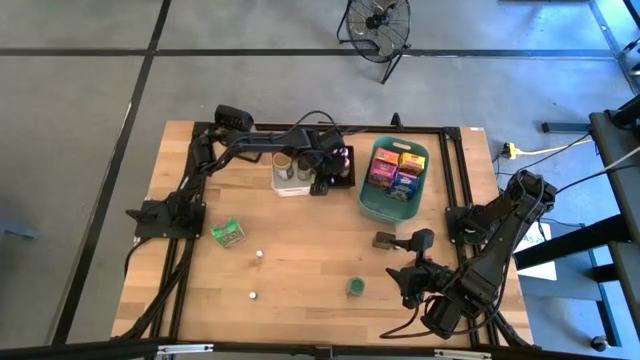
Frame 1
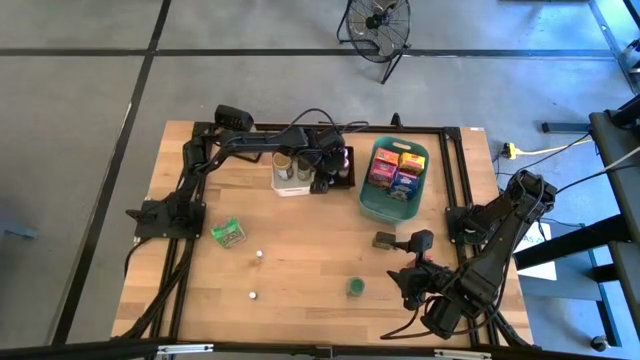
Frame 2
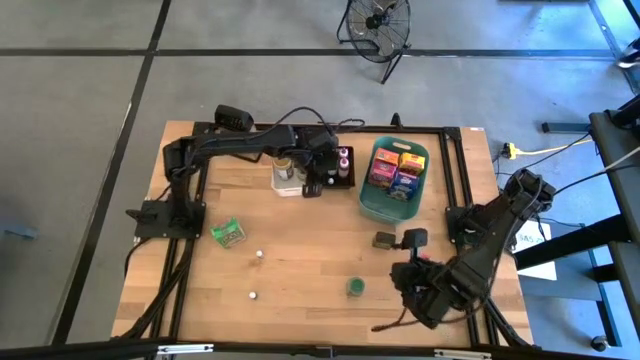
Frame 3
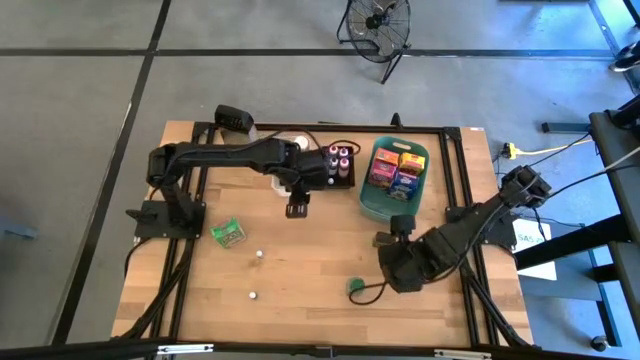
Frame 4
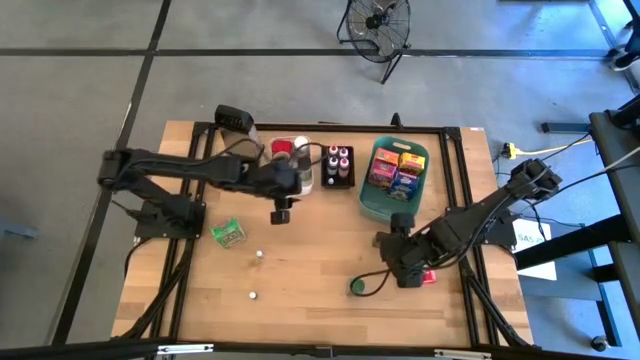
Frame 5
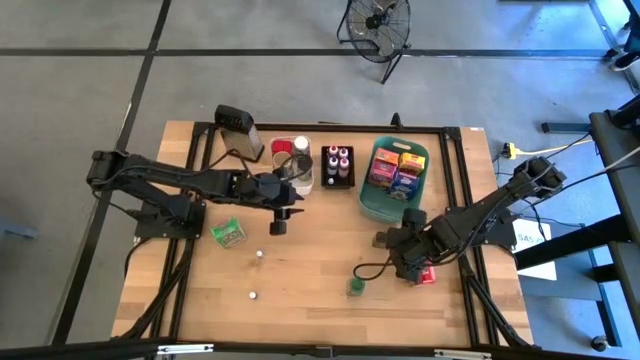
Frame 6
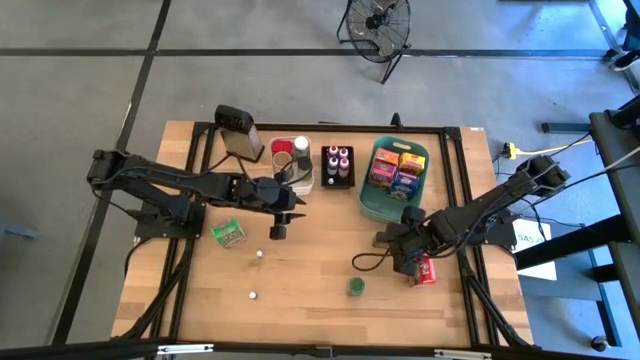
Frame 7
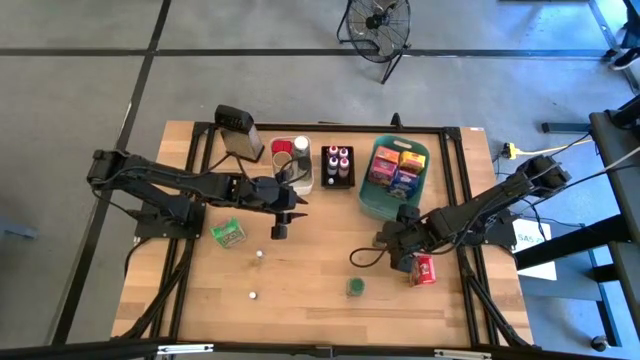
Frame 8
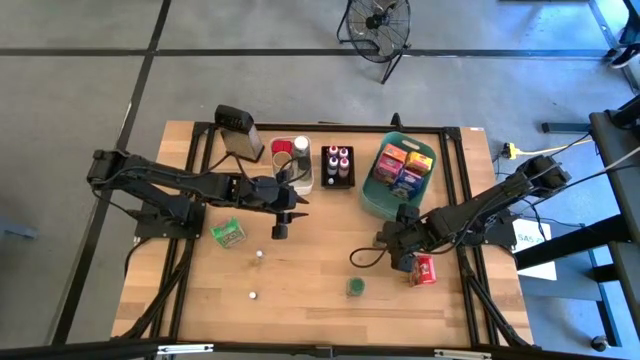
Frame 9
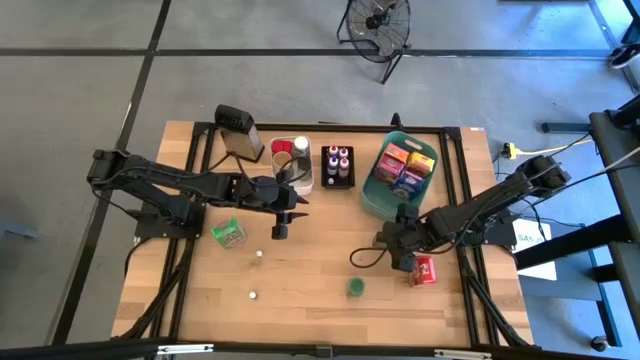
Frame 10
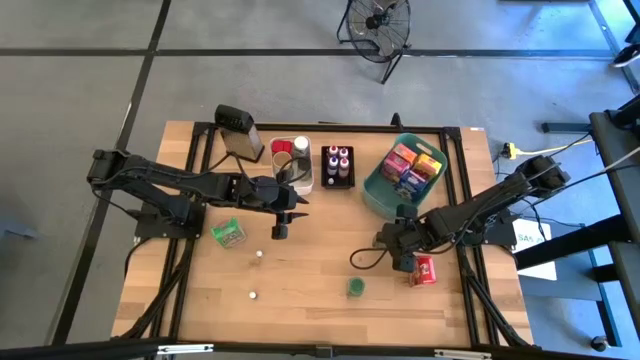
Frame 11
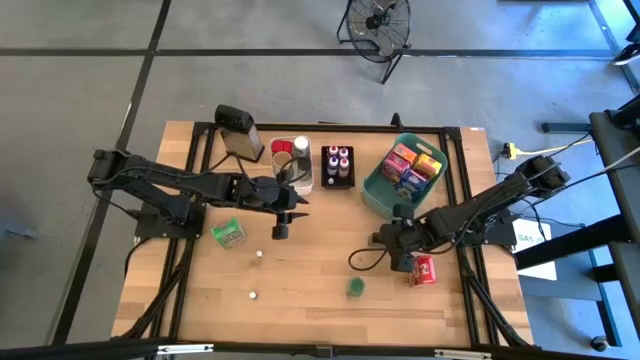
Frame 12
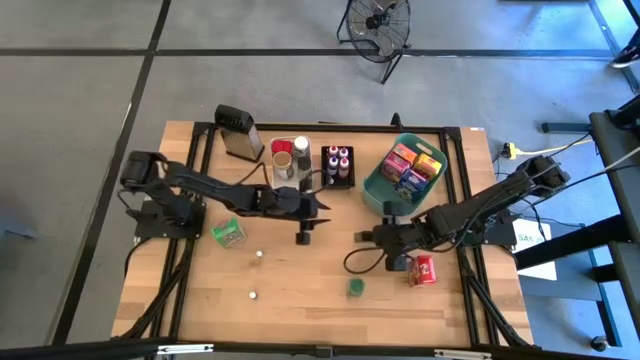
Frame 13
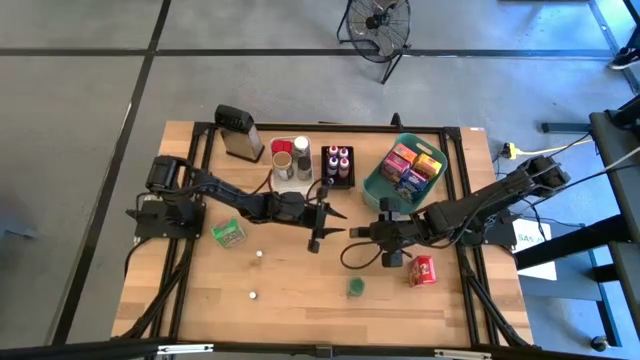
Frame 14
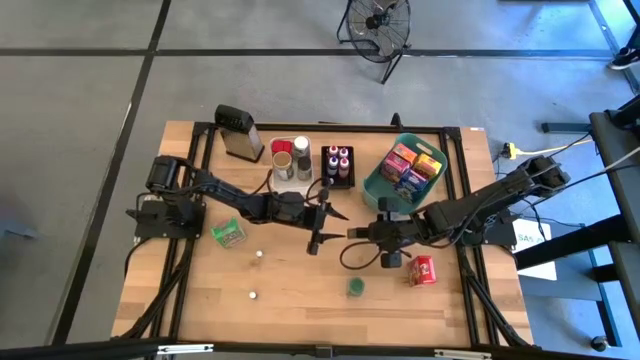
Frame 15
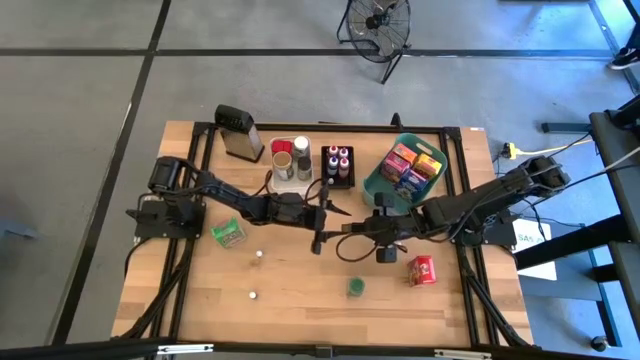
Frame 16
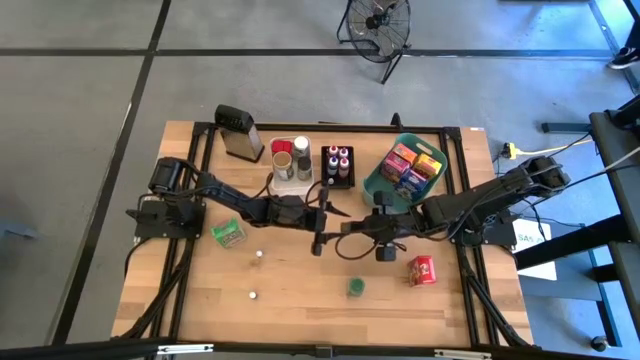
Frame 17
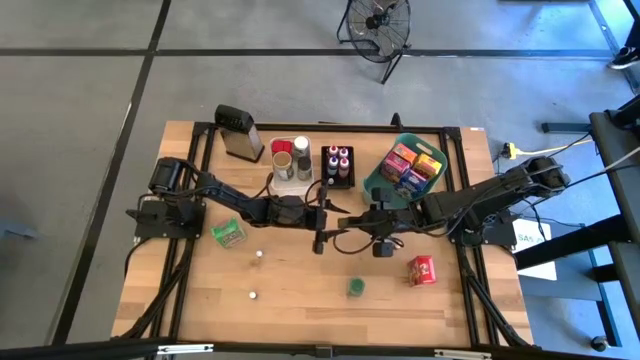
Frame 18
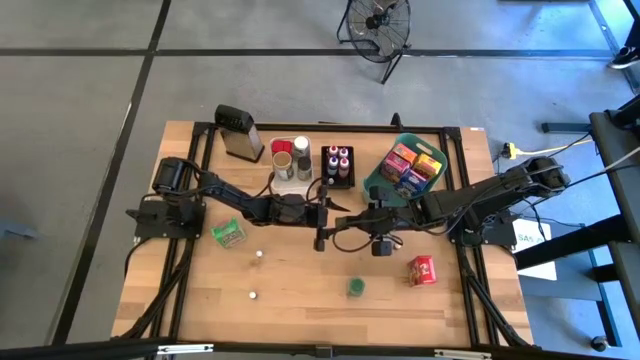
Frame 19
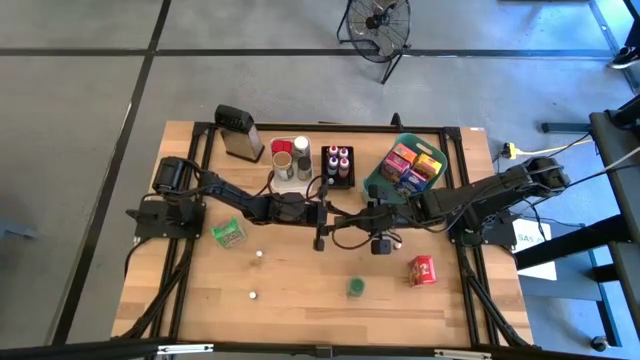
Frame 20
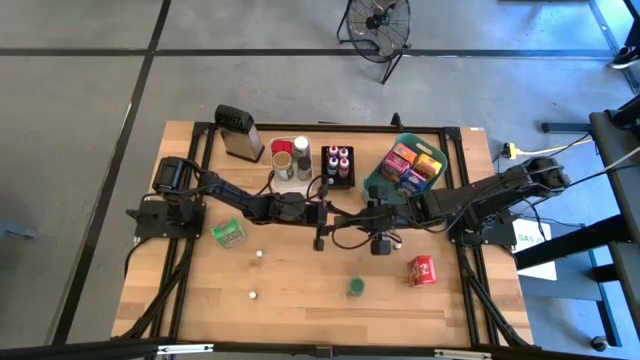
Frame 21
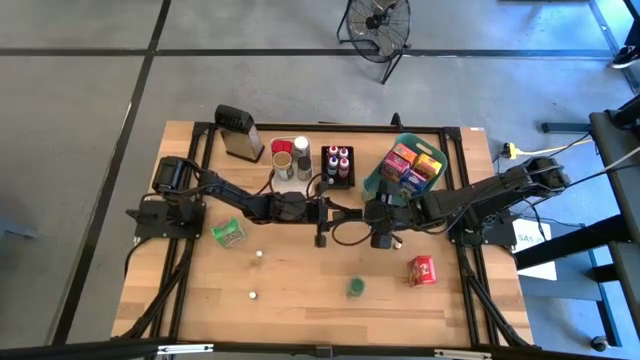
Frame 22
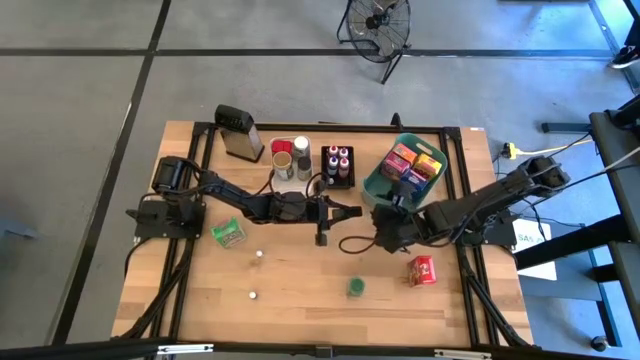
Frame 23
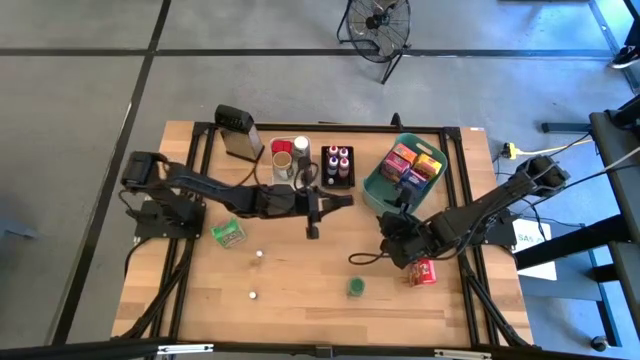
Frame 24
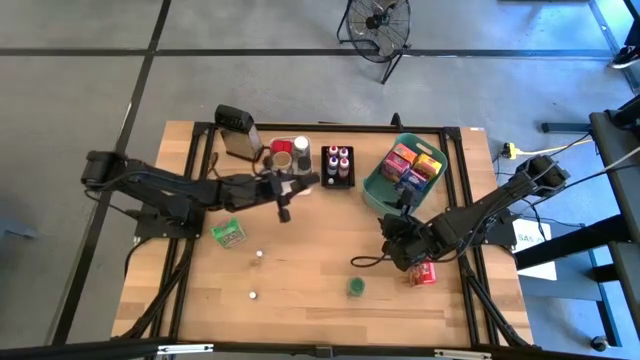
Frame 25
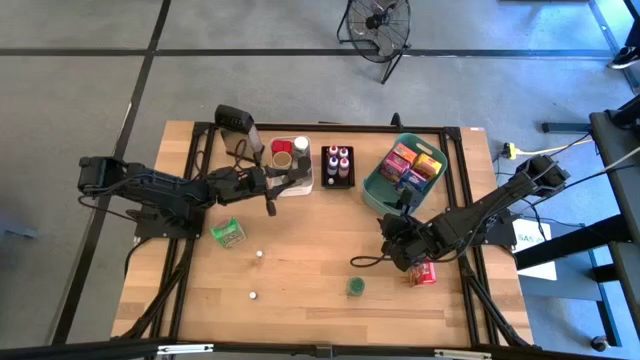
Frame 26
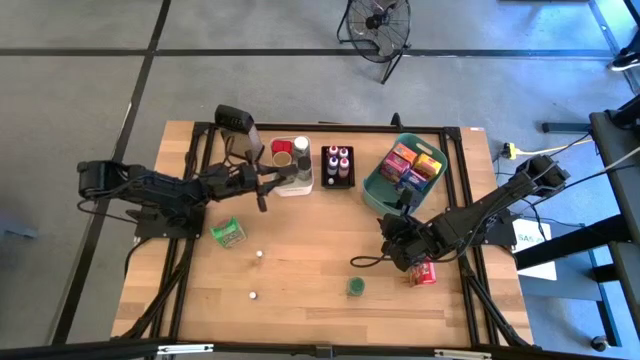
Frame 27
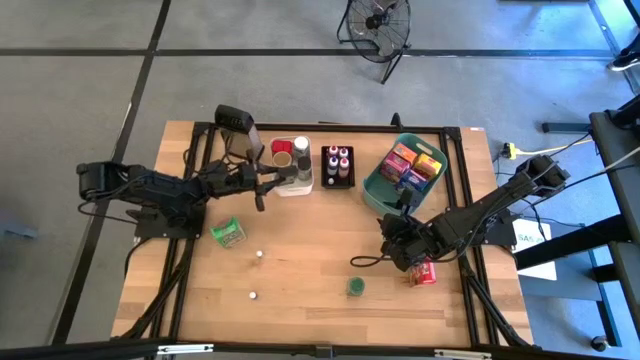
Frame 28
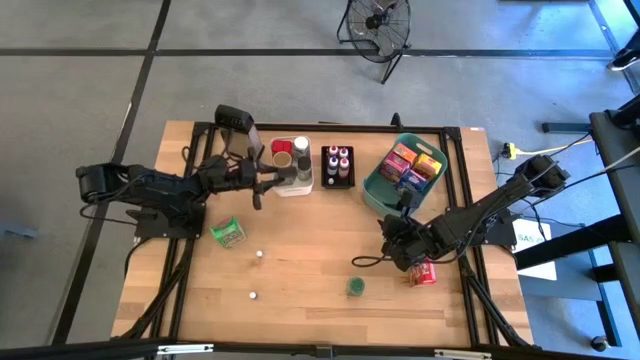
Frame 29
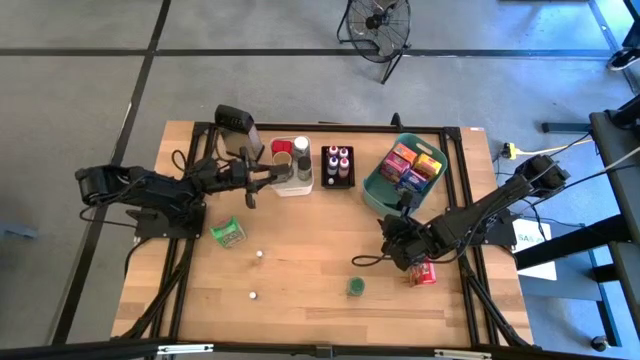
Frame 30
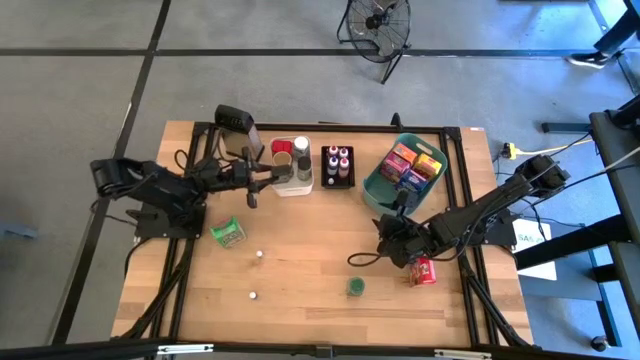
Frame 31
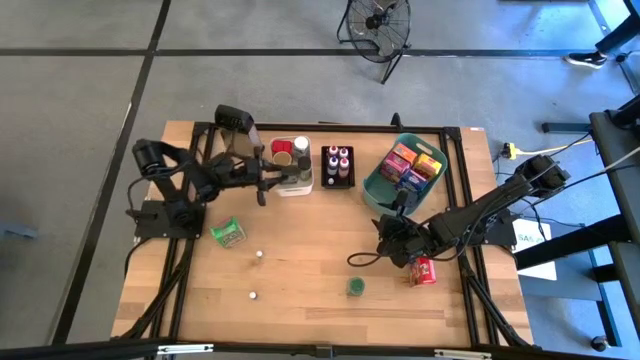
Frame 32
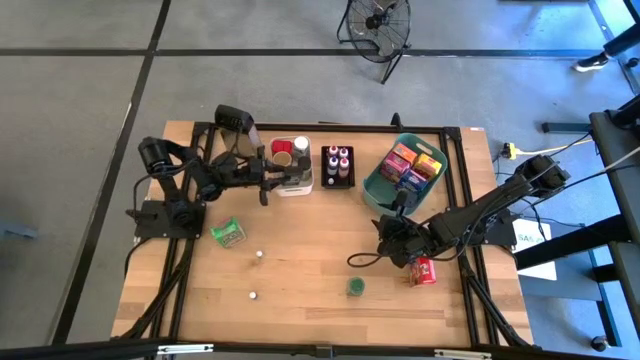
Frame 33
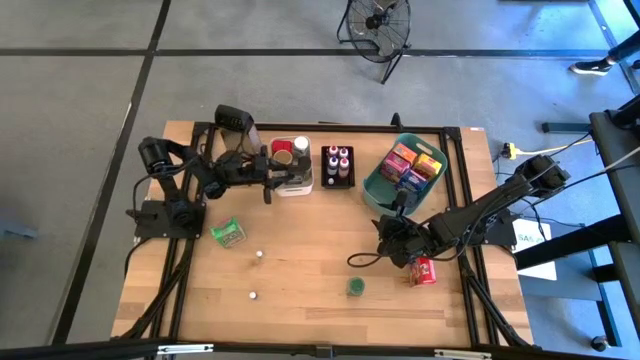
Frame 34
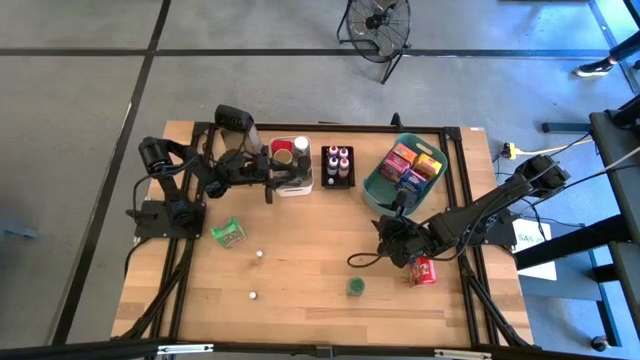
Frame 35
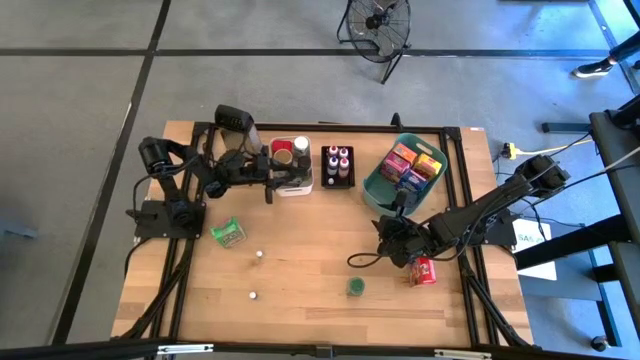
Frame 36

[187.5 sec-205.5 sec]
Task: Pick & Place Kitchen Items
Put the black spice can into the white bin

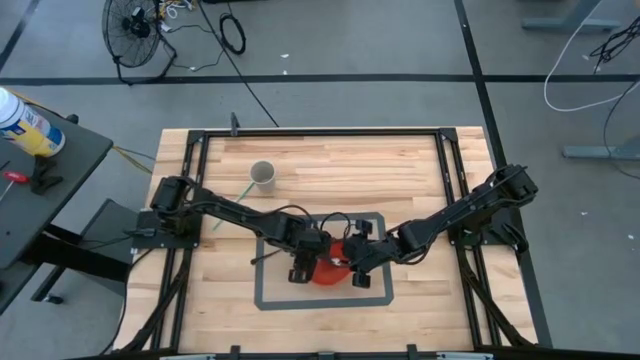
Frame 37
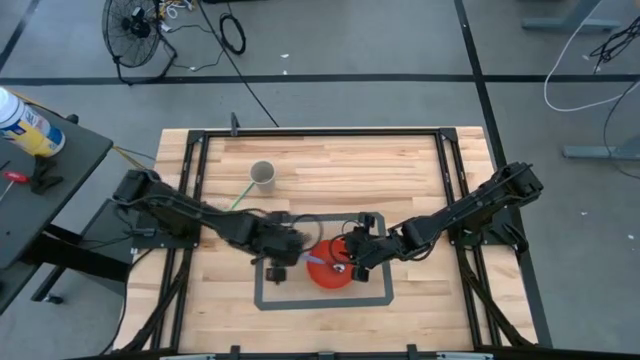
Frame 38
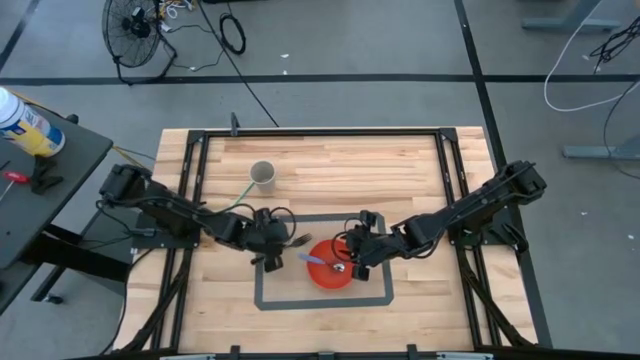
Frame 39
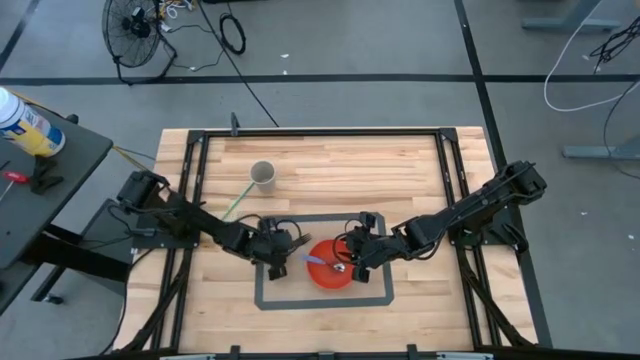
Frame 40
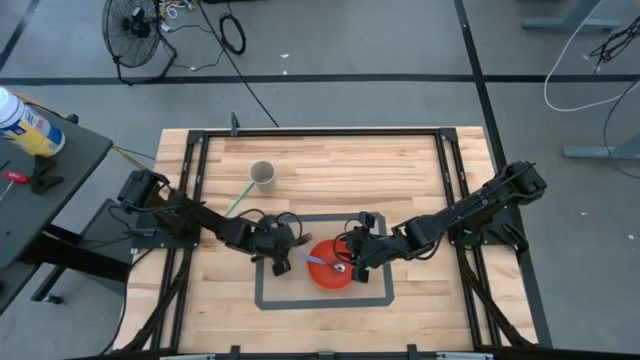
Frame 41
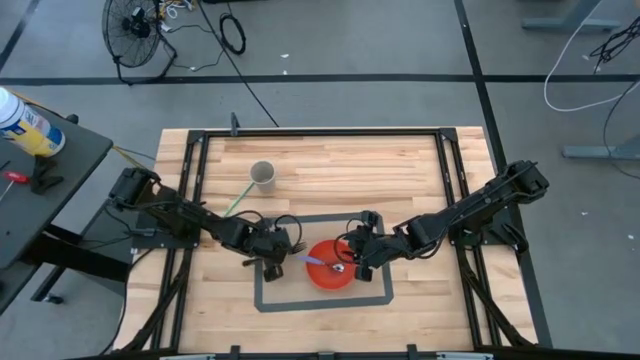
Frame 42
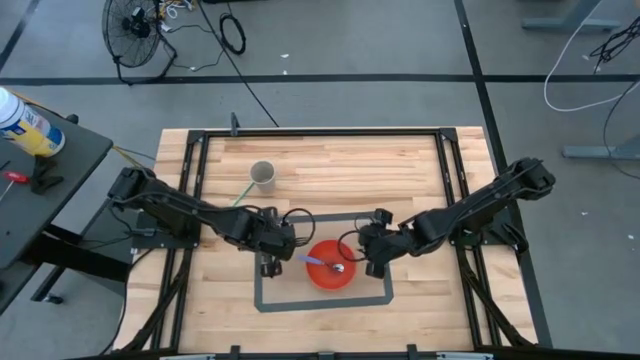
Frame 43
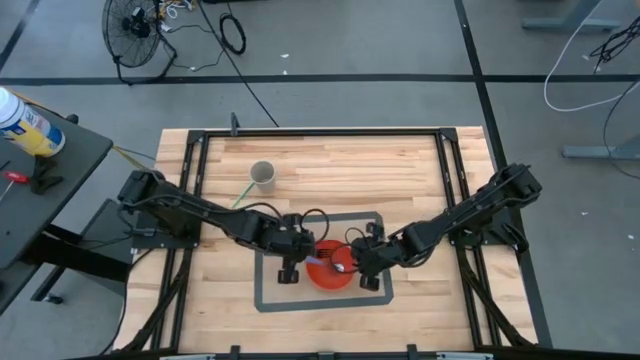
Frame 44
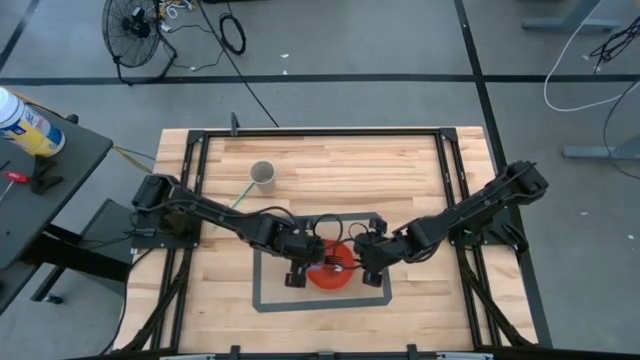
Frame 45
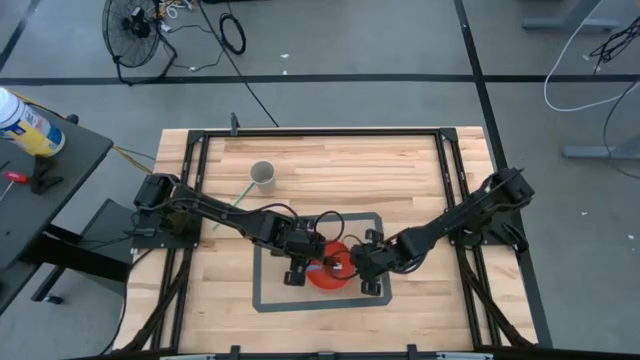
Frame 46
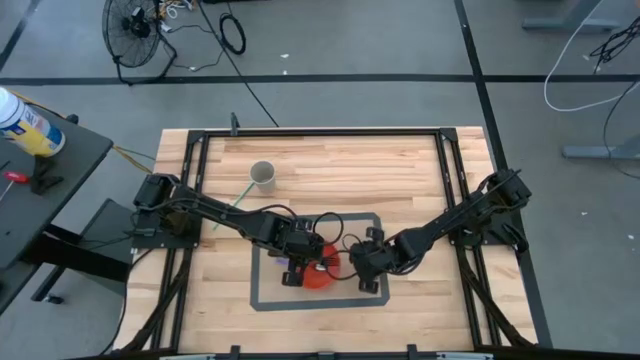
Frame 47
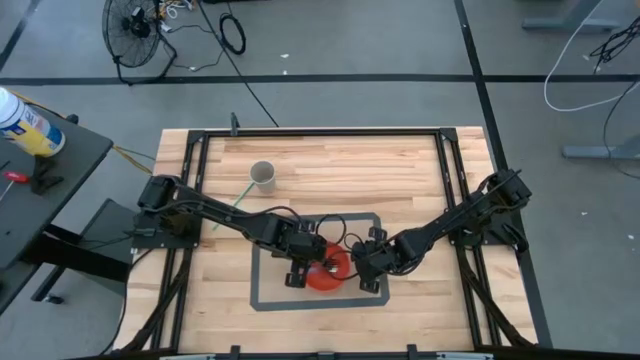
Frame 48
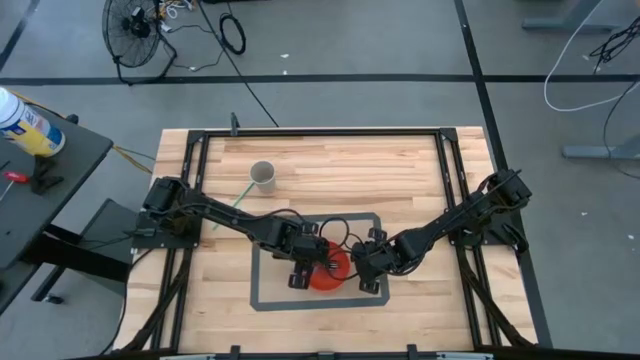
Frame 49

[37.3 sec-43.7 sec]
Task: Pick & Place Utensil
Put the black fork into the orange bowl on the brown table mat
